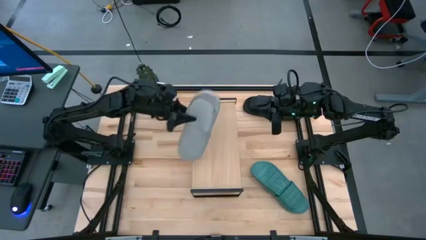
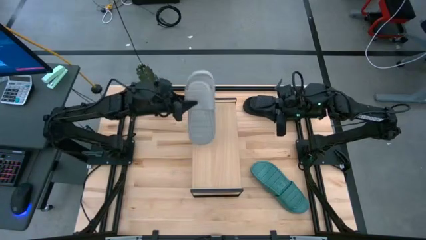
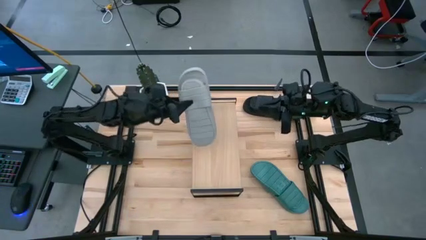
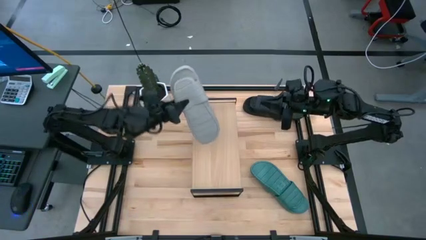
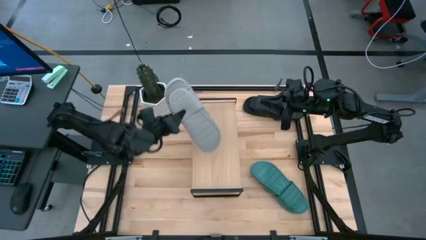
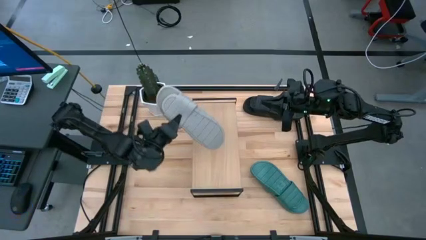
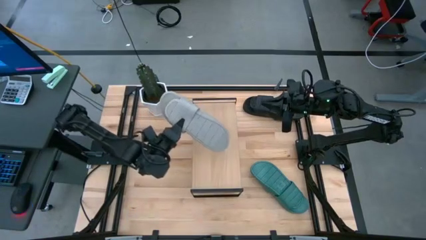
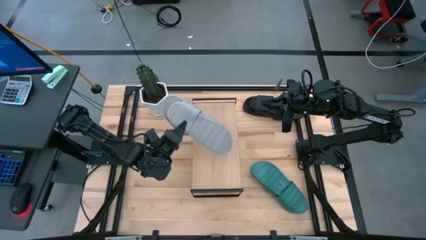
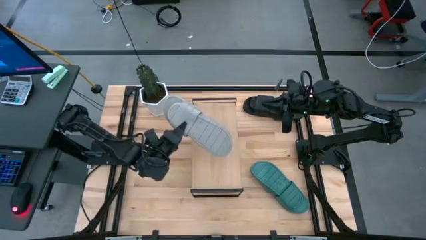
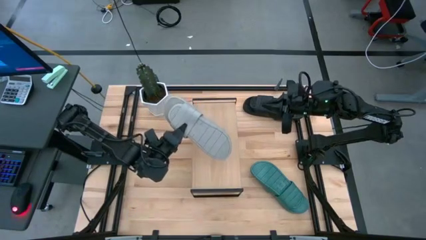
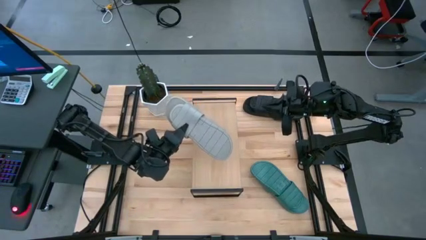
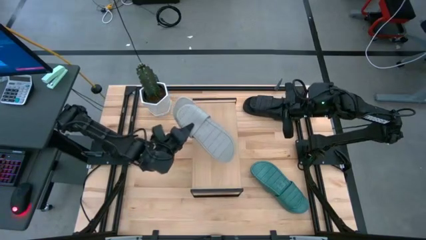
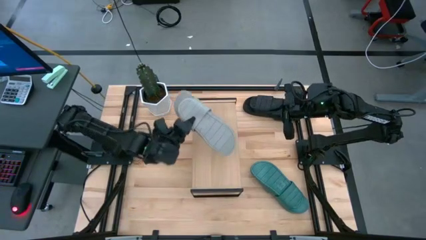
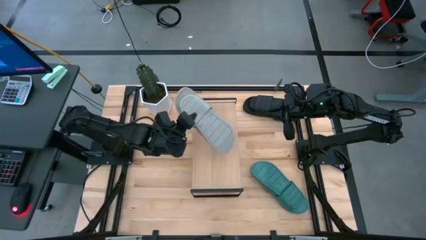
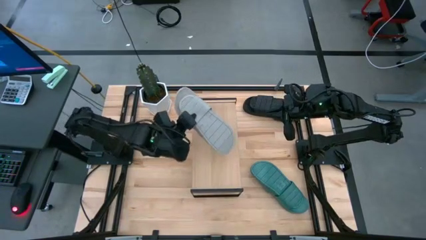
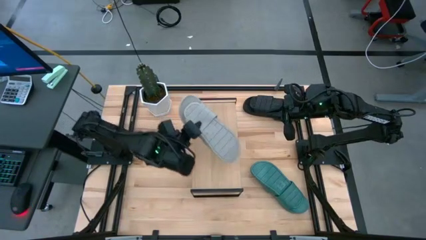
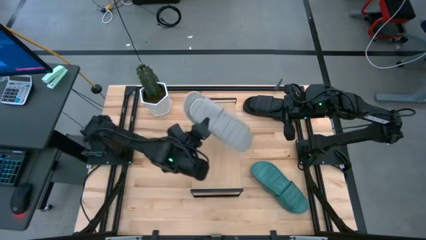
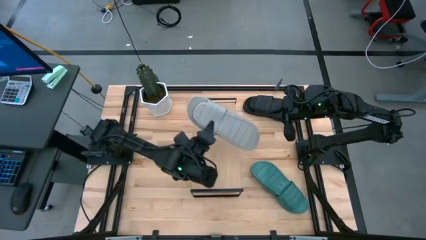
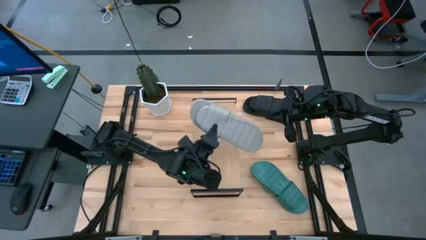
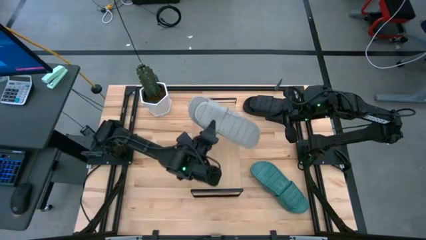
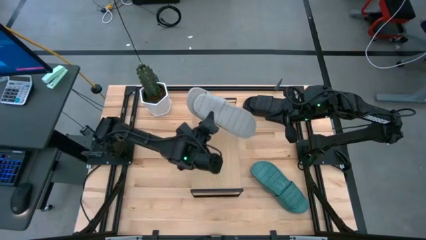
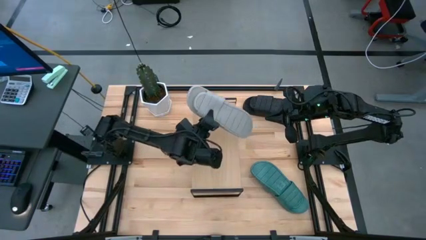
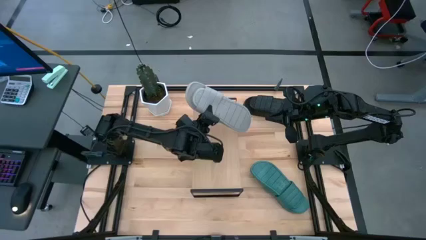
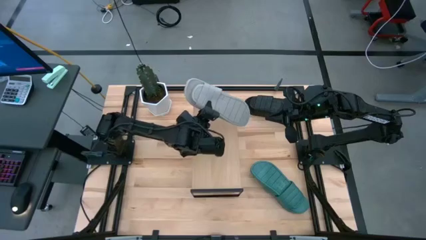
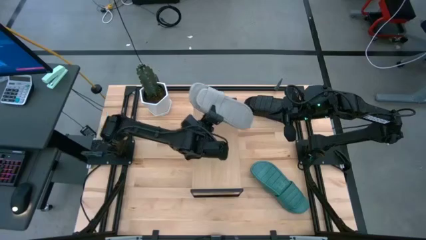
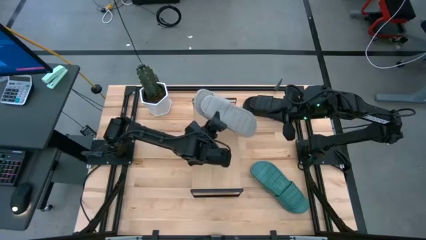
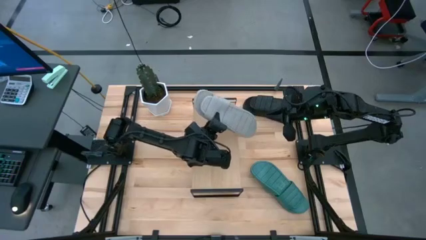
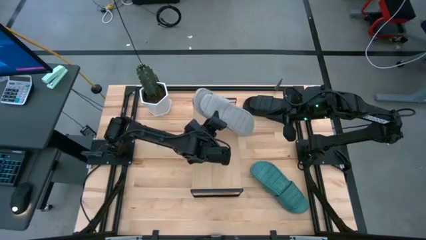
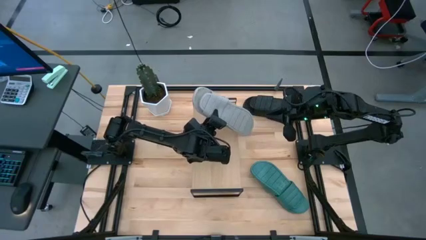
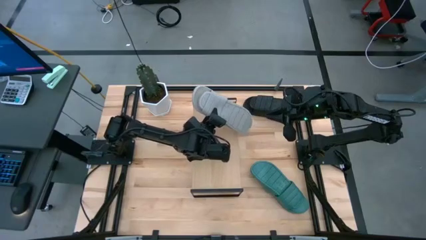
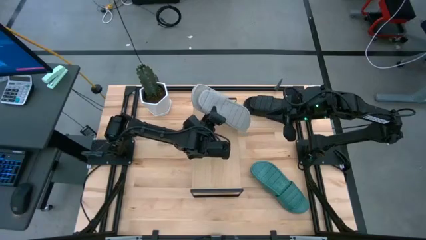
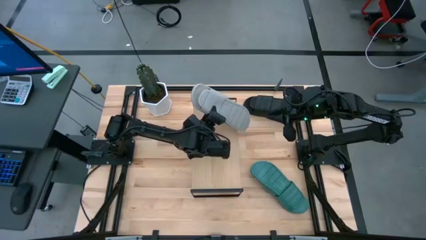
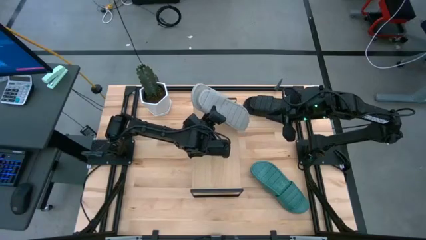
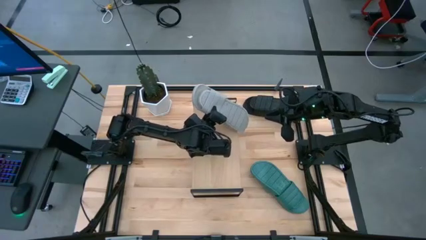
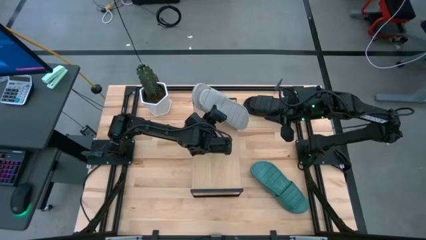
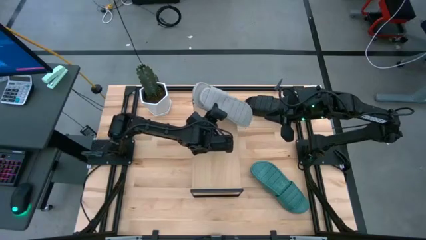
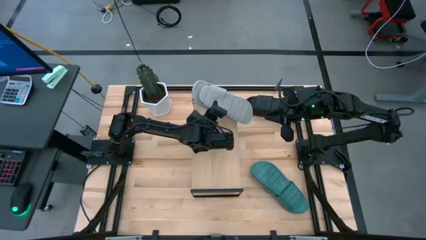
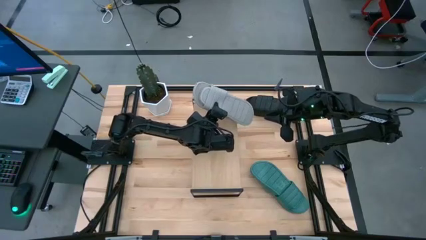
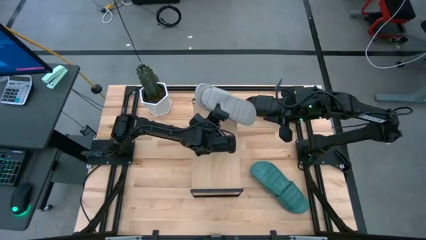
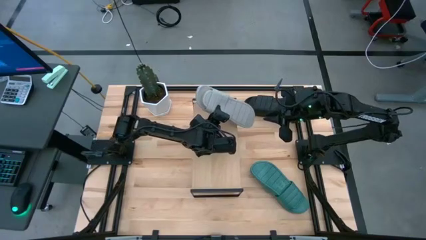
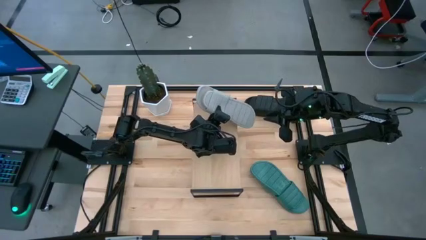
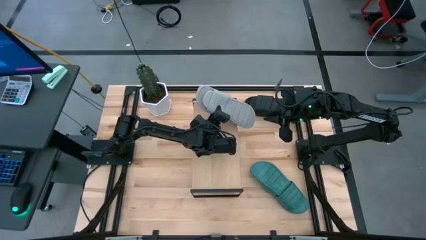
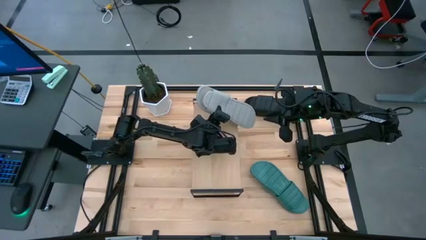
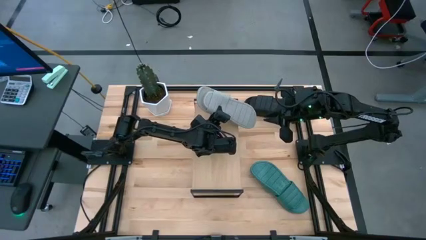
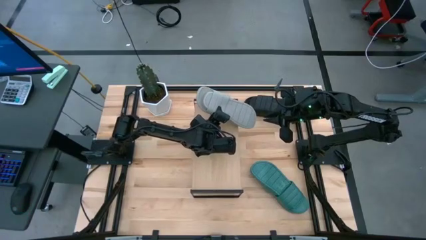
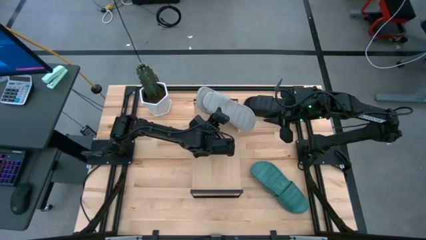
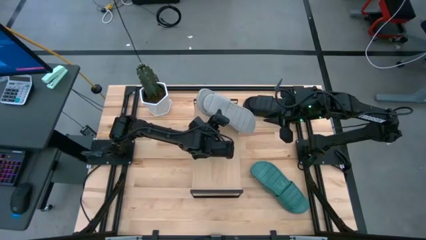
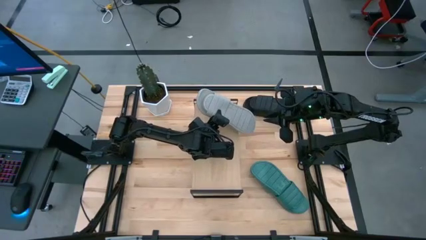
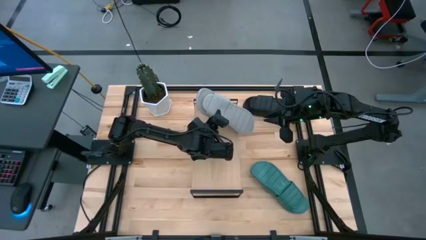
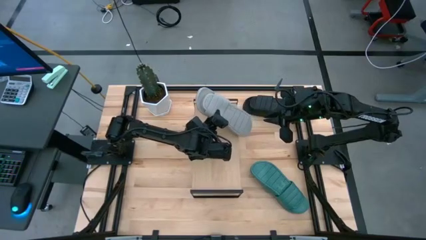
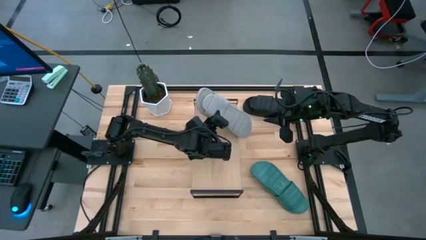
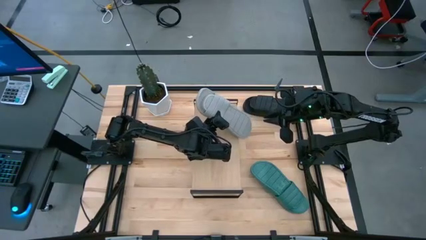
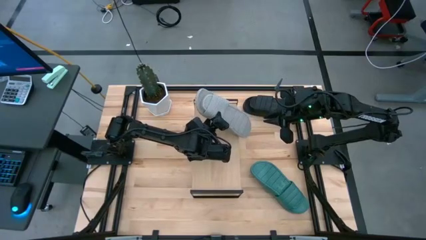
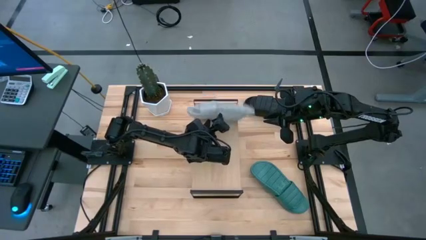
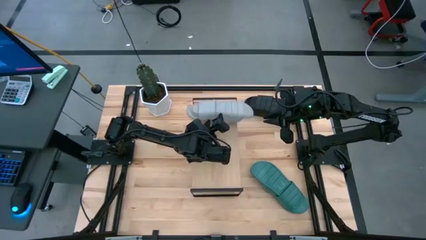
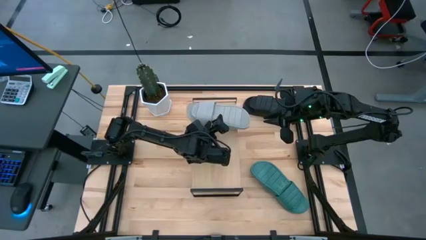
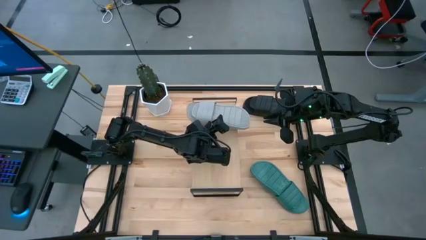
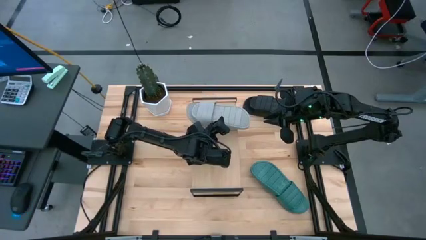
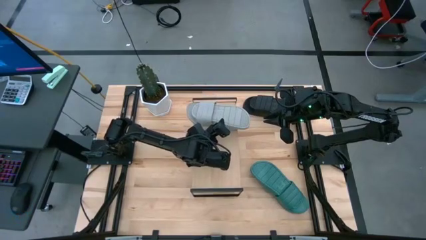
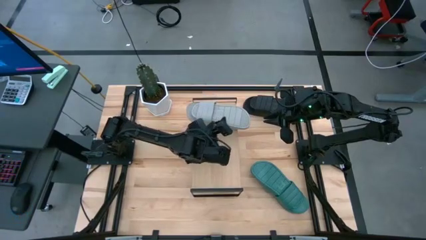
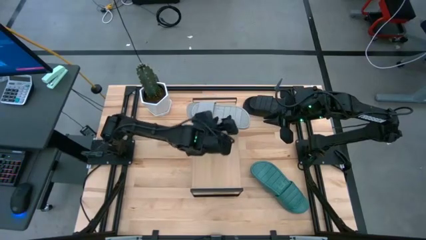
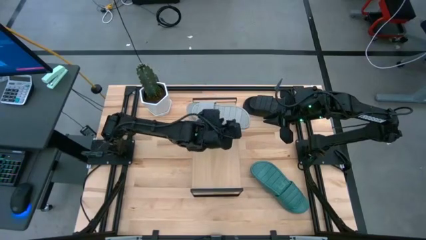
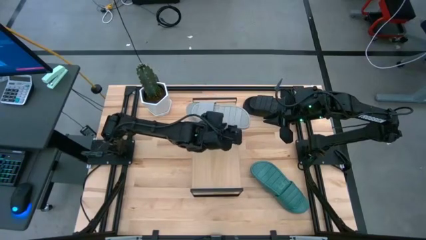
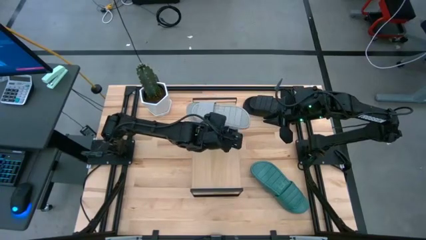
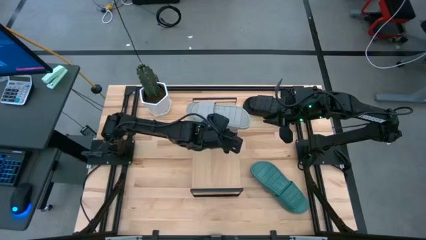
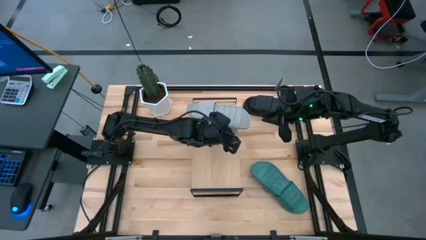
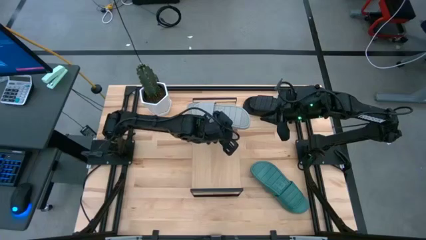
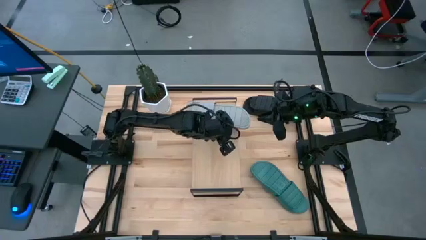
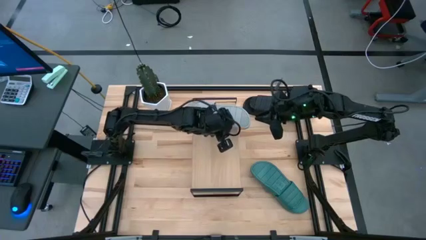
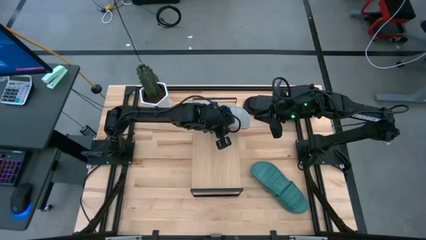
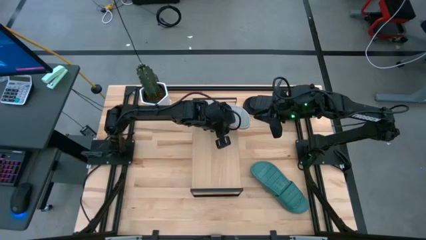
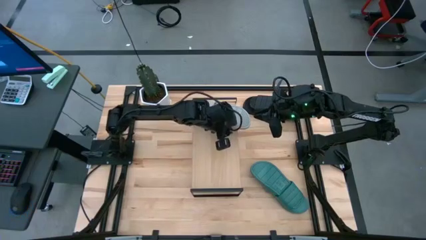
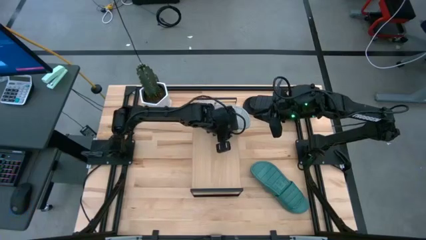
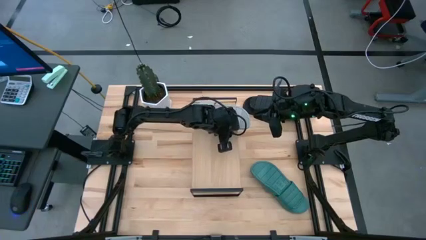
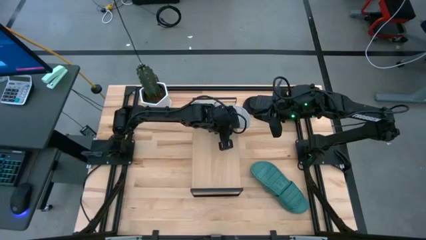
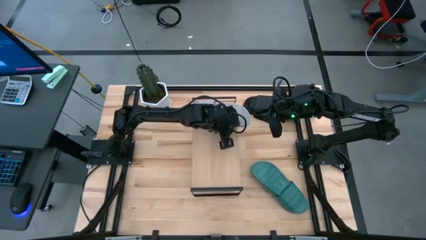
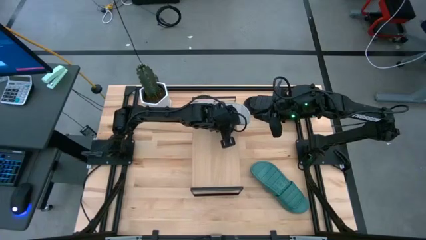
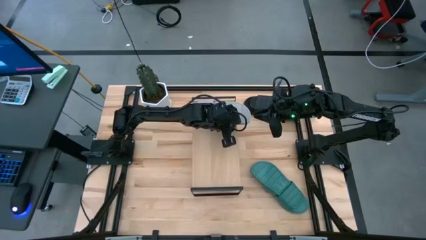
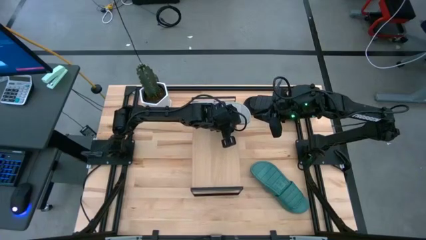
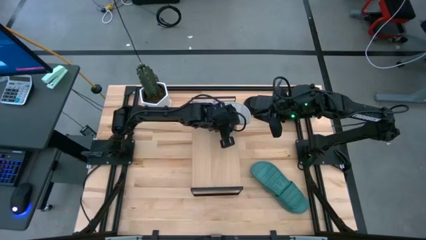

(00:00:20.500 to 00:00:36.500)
Task: Pick and place slippers onto the shelf
Put the gray pair of slippers on the shelf
